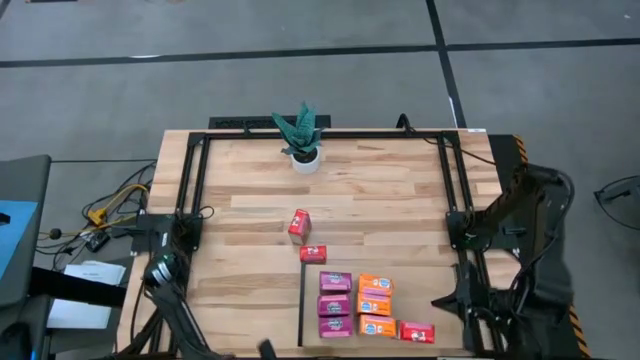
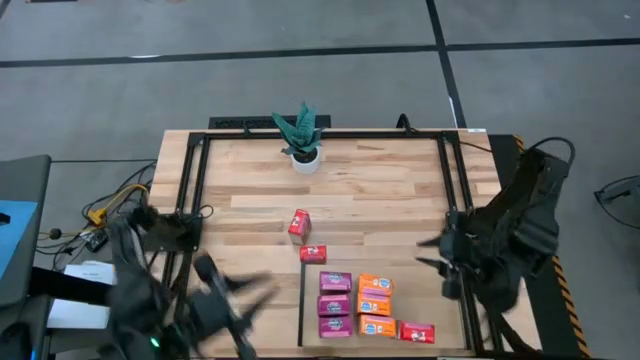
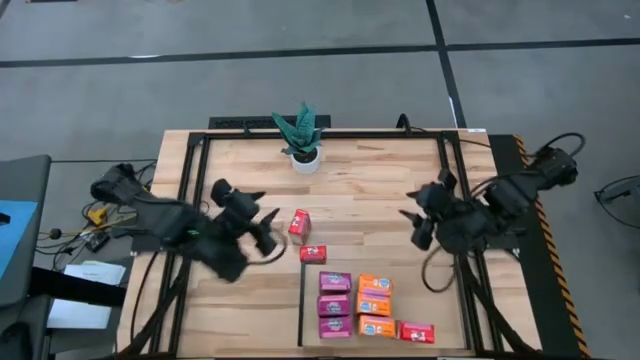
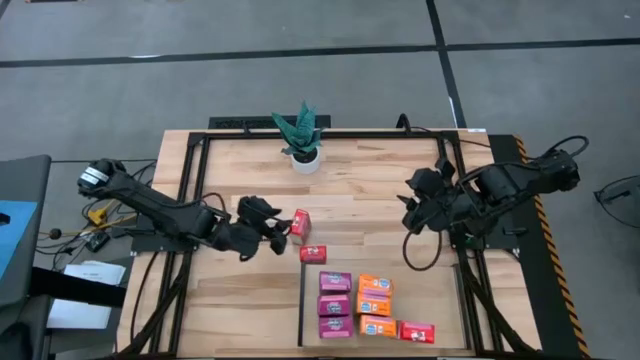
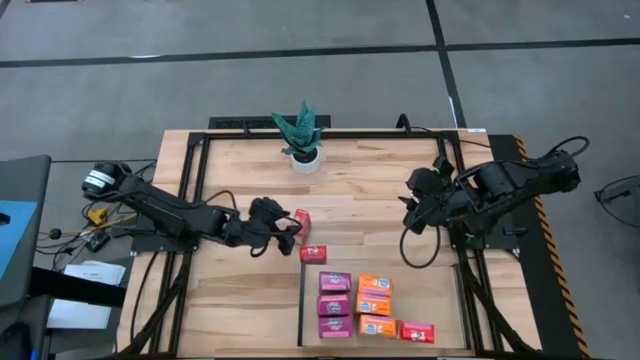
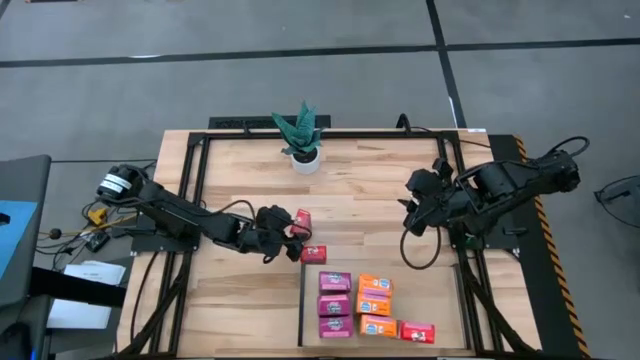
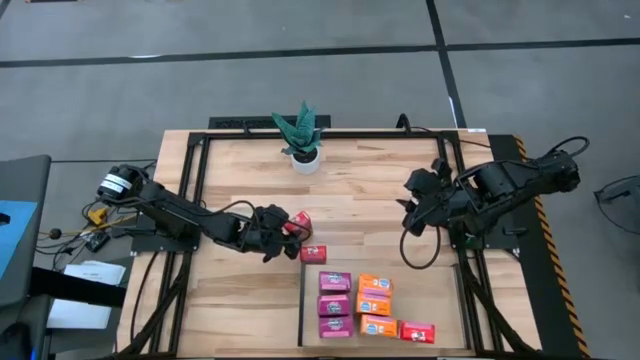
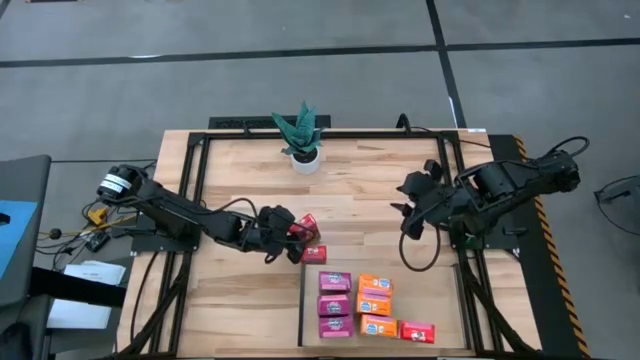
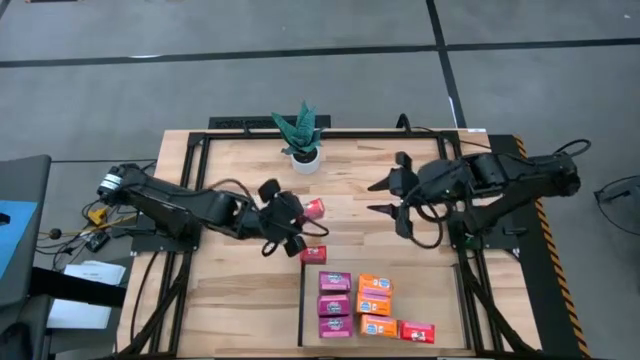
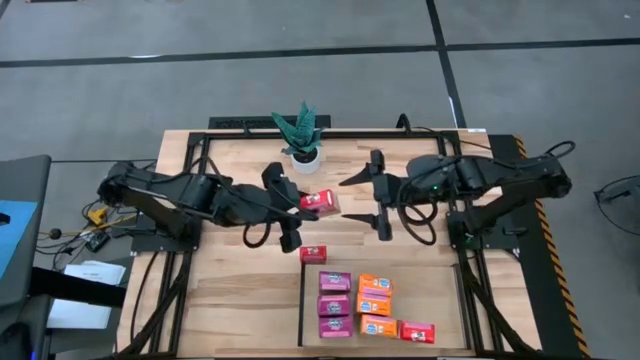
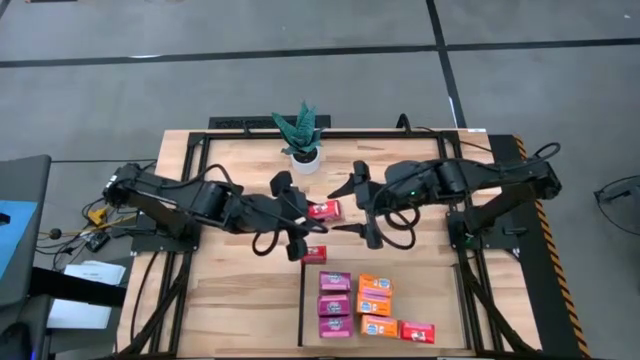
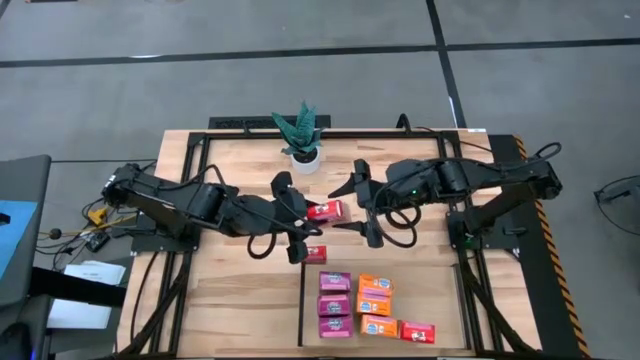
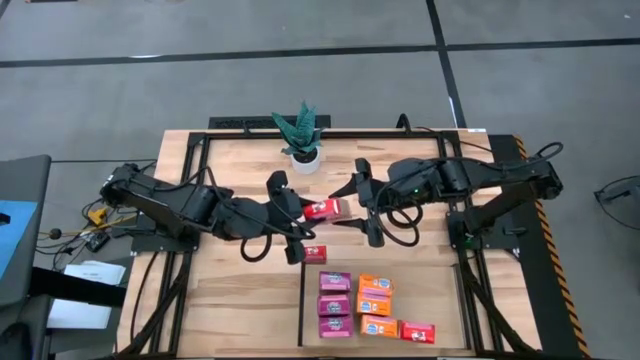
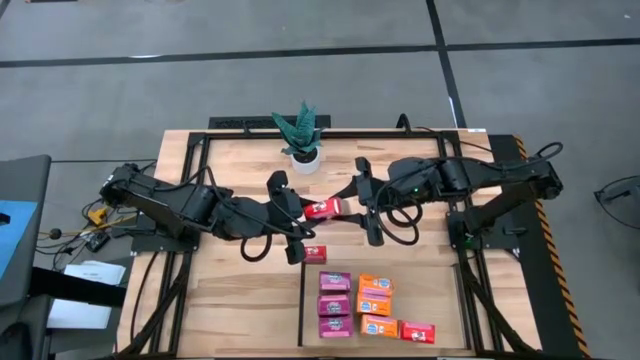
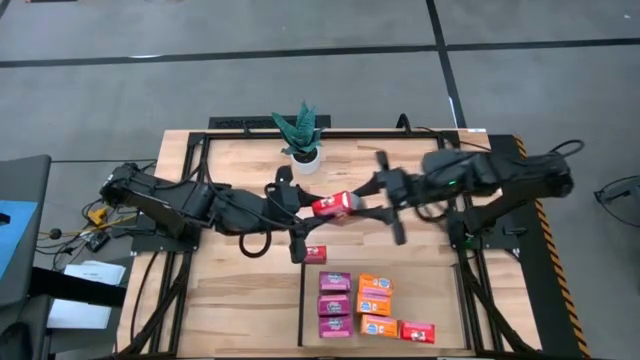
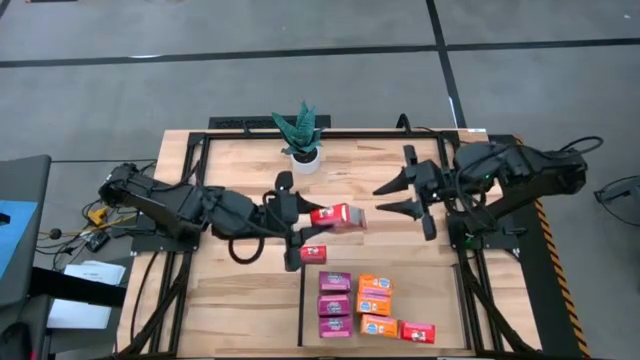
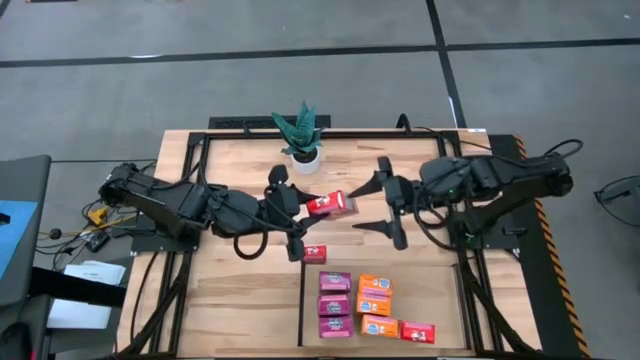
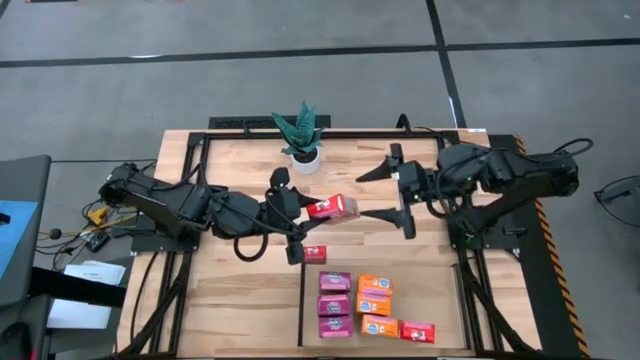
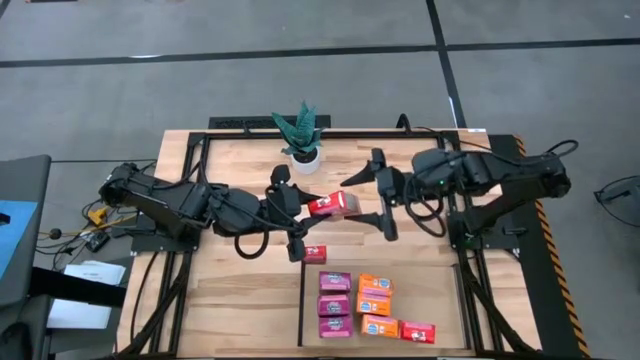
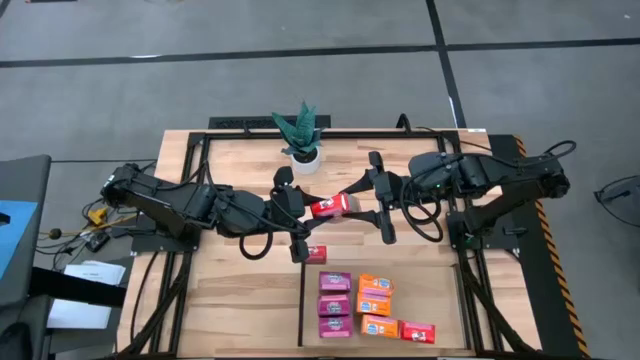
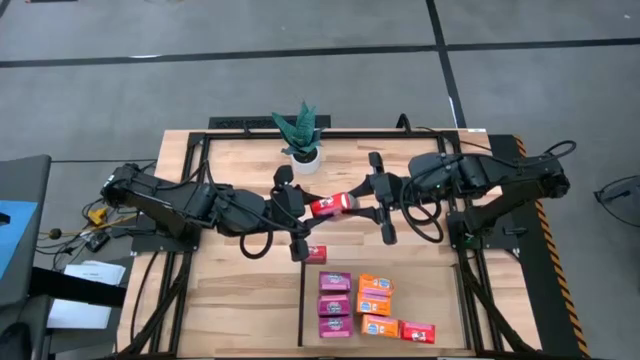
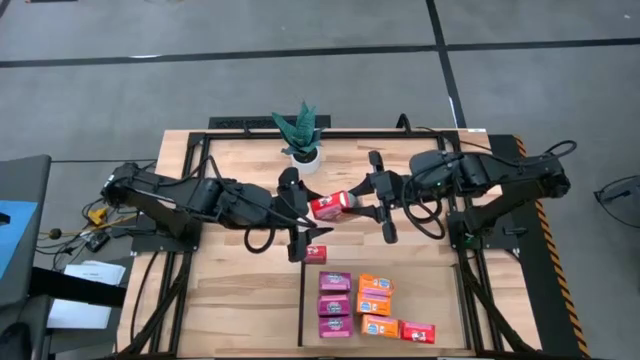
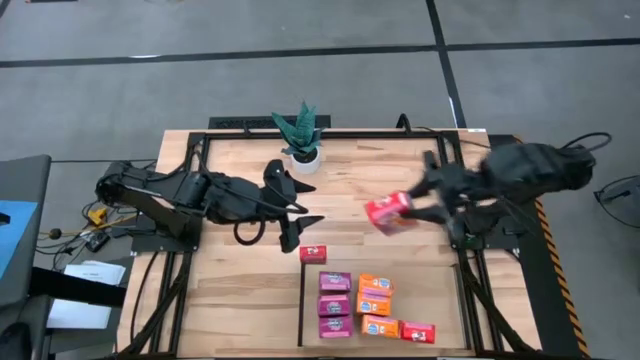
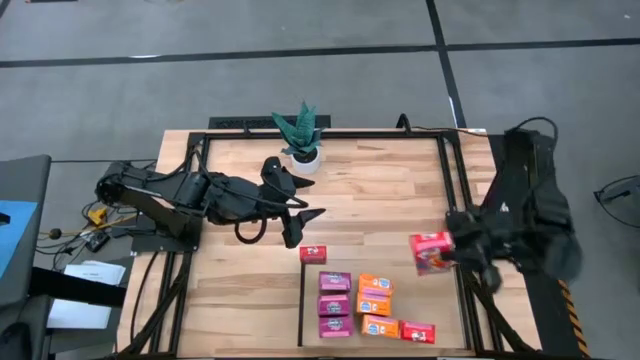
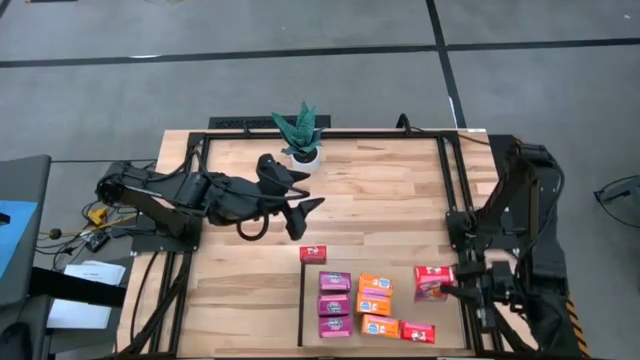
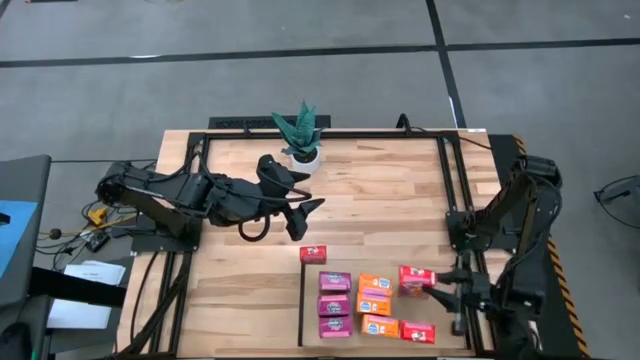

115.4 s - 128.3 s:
Task: Stack cereal on shelf
Put the red cereal box on the middle right shelf

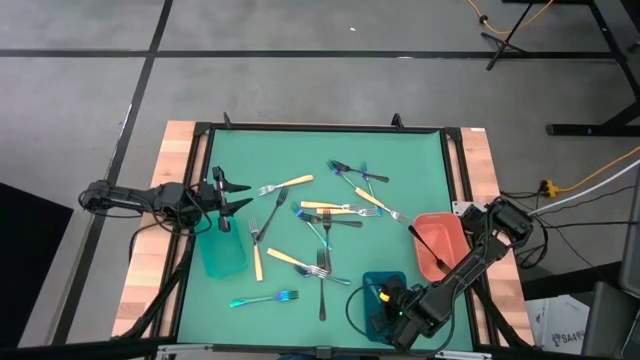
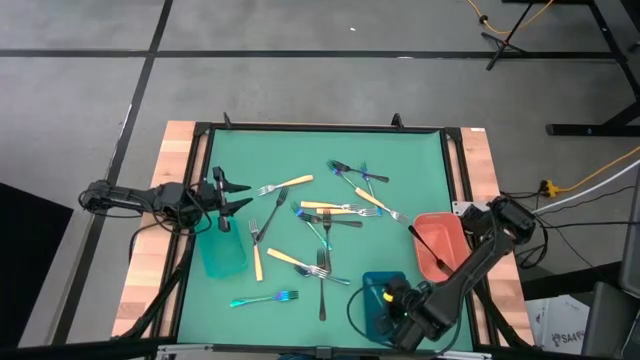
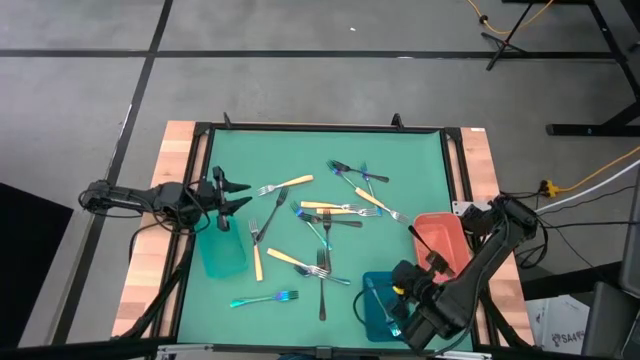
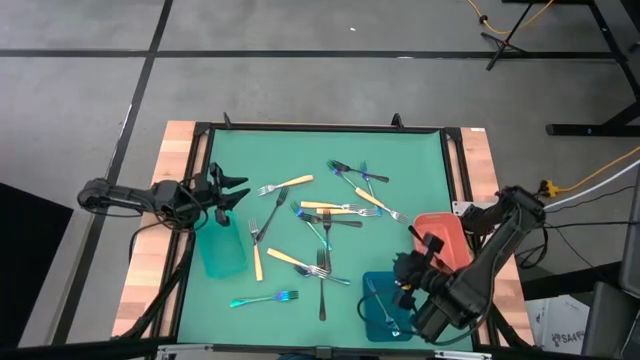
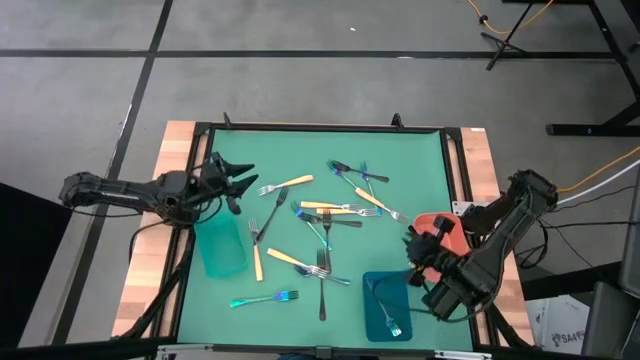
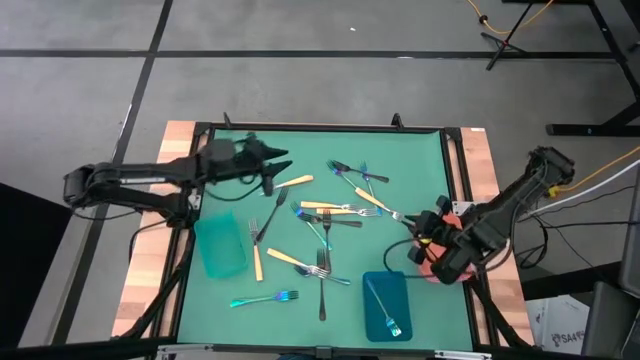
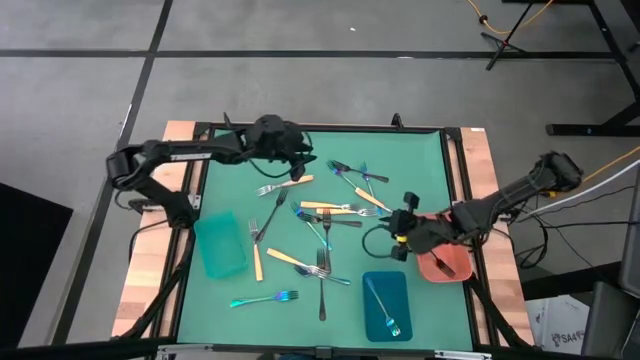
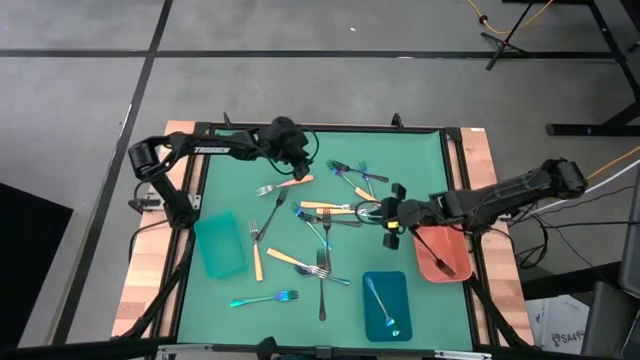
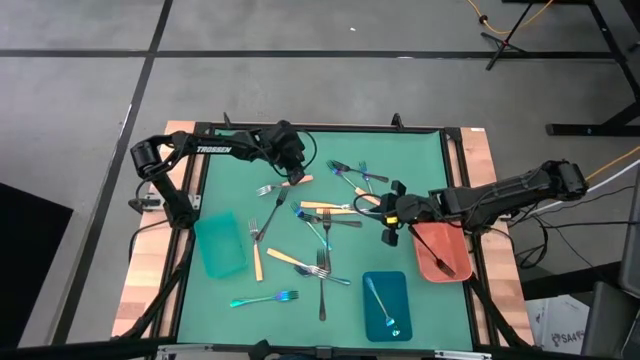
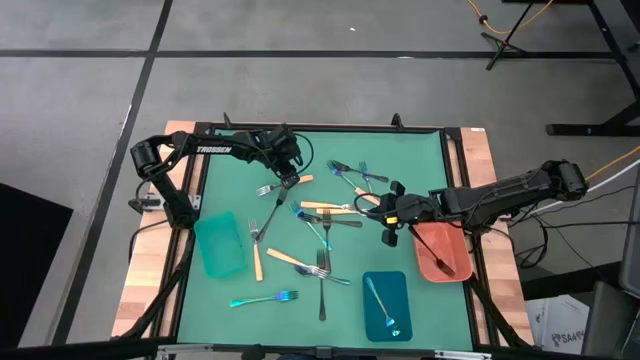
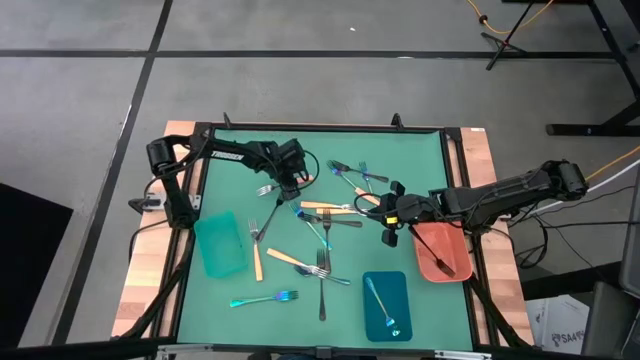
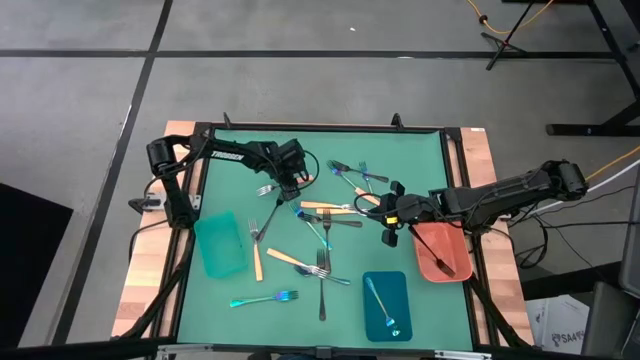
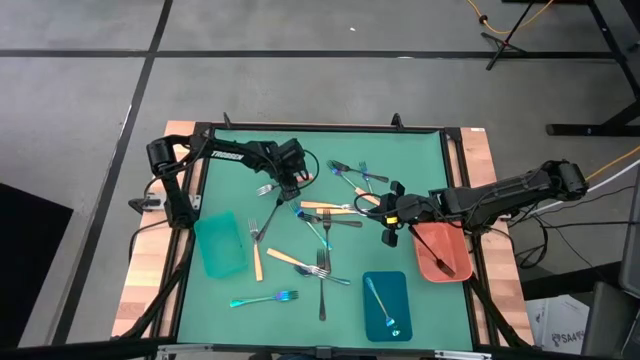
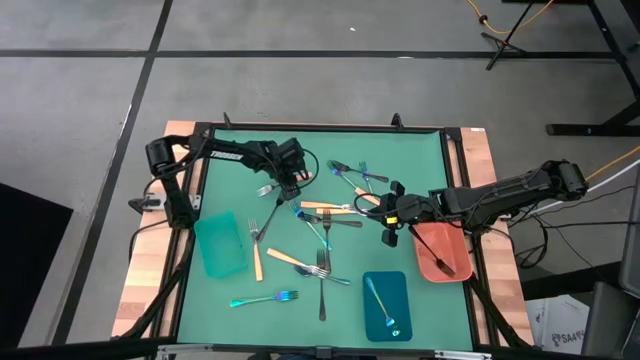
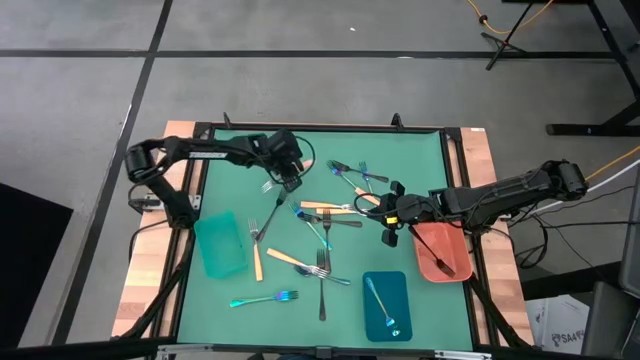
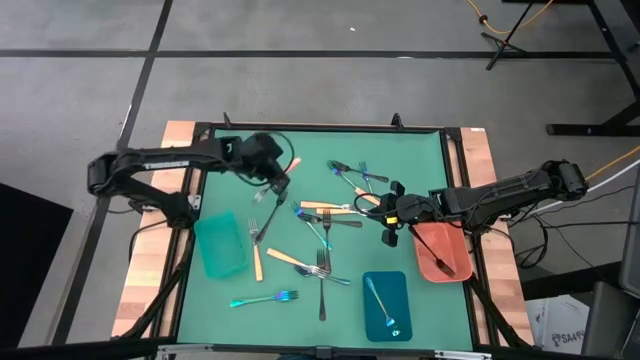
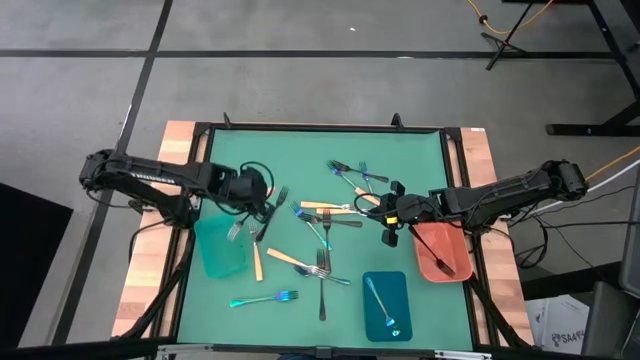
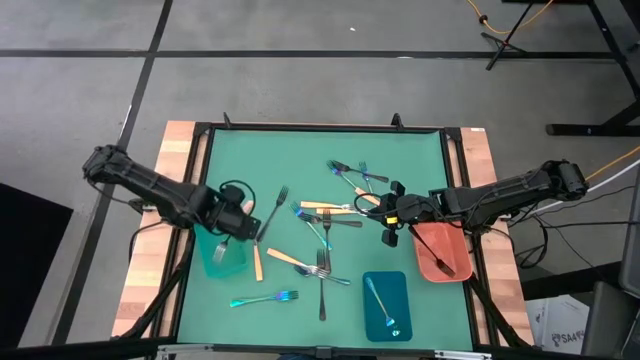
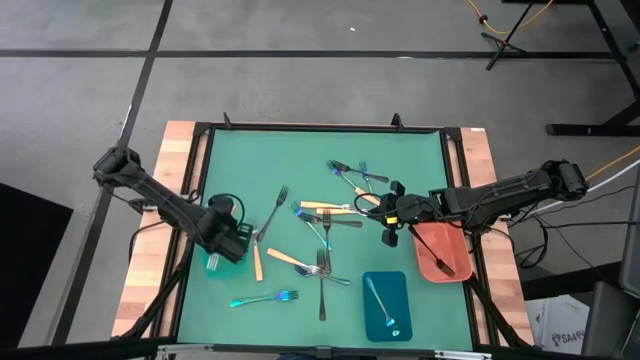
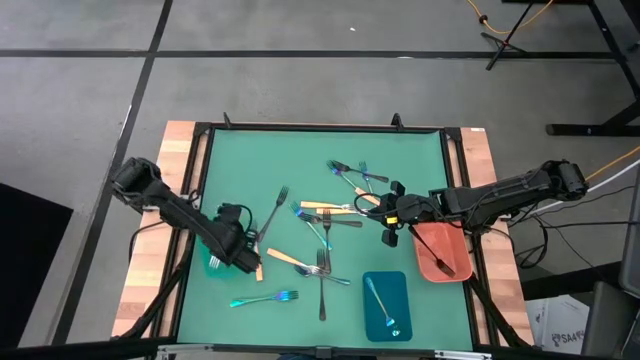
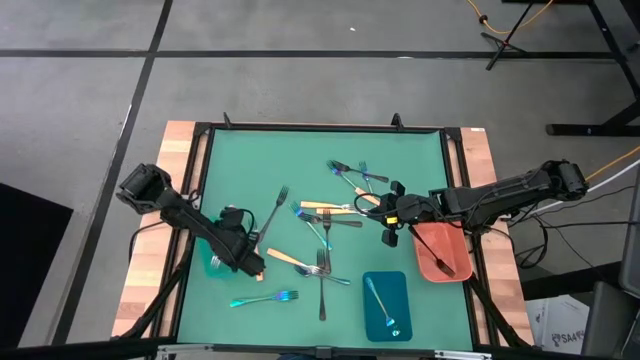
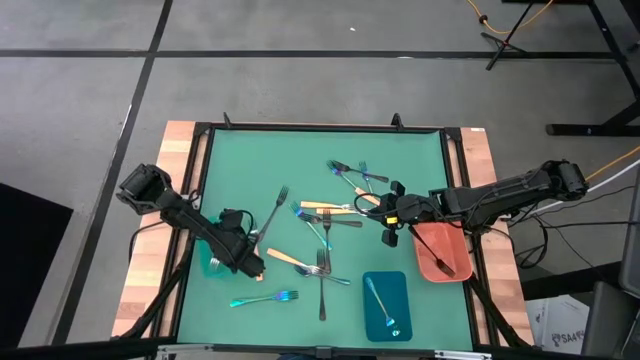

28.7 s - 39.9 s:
Task: Sort silverware by color (type)
Put the yellow fork into the green bin
